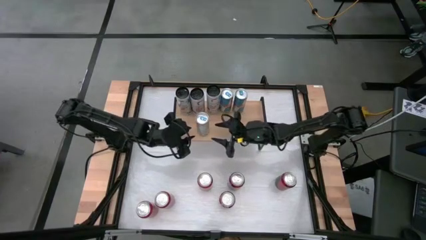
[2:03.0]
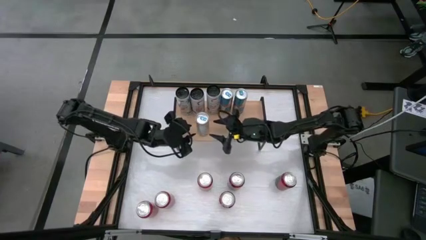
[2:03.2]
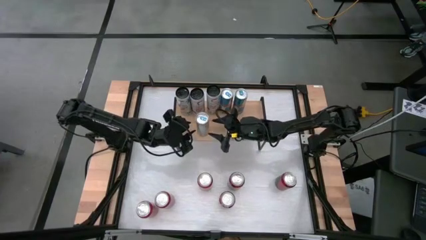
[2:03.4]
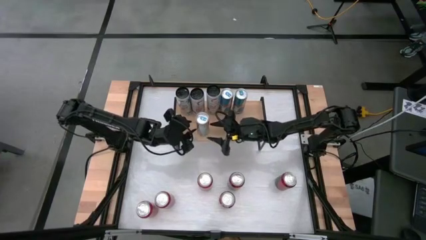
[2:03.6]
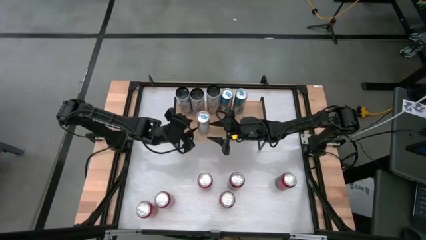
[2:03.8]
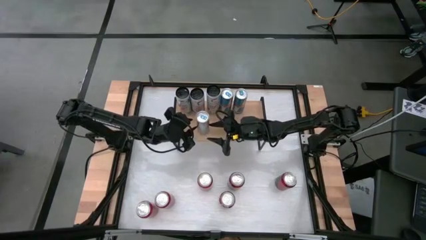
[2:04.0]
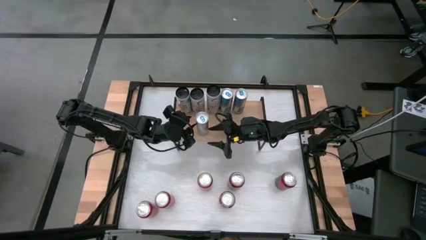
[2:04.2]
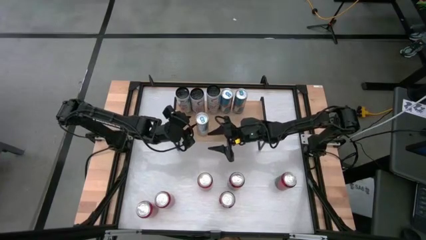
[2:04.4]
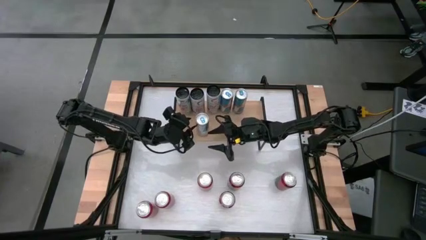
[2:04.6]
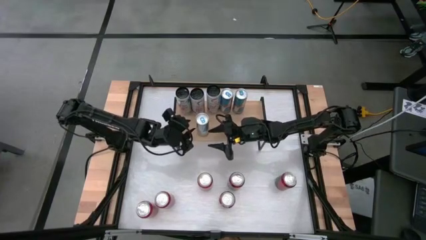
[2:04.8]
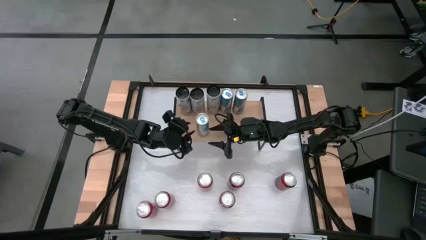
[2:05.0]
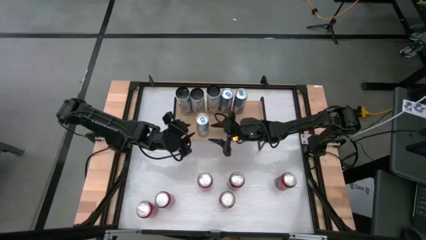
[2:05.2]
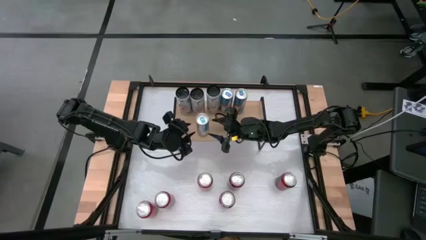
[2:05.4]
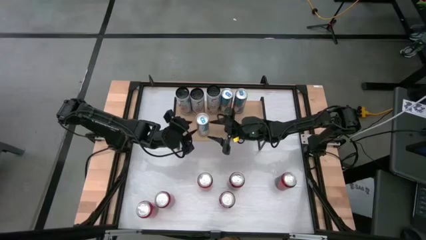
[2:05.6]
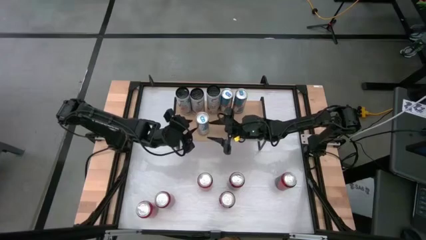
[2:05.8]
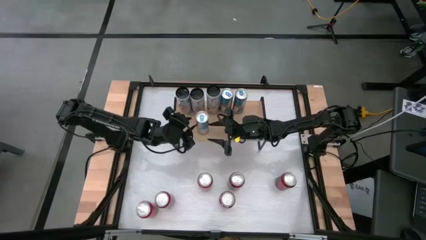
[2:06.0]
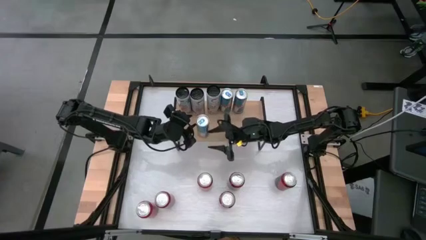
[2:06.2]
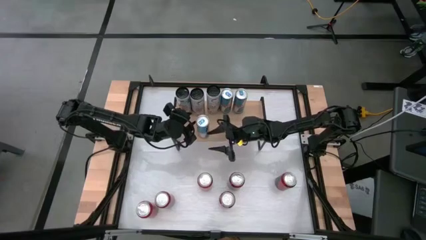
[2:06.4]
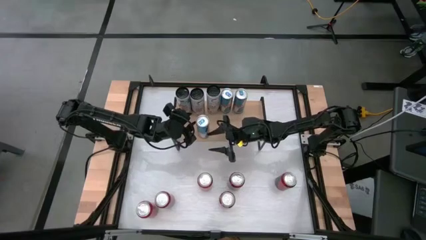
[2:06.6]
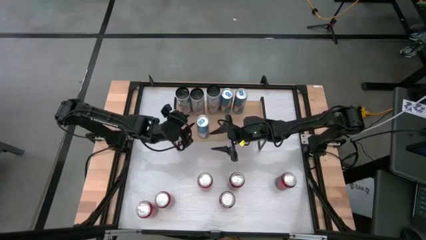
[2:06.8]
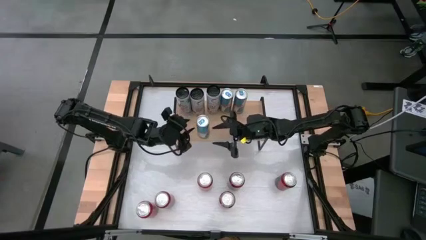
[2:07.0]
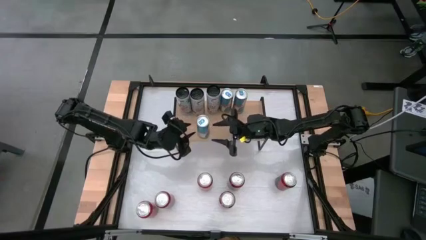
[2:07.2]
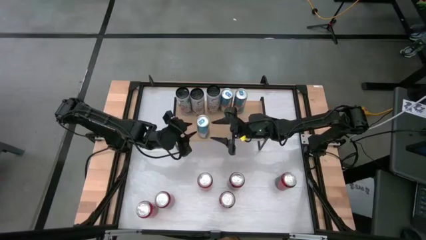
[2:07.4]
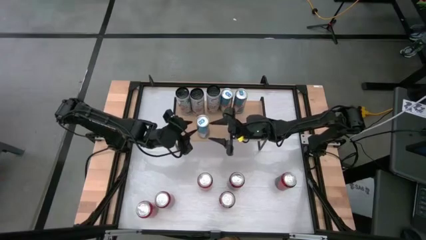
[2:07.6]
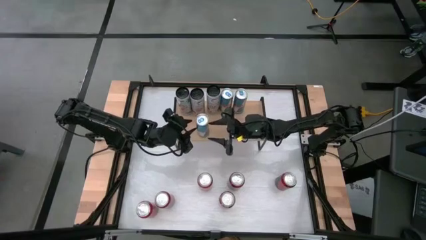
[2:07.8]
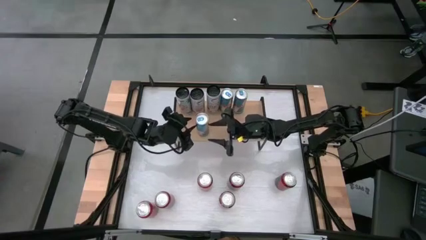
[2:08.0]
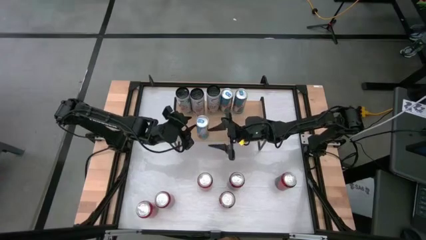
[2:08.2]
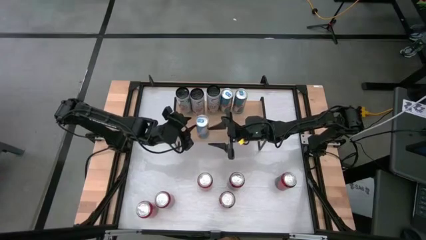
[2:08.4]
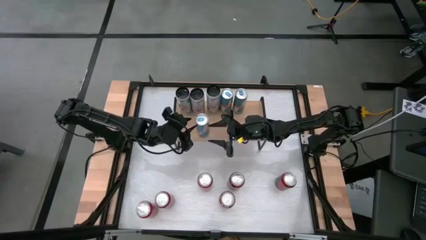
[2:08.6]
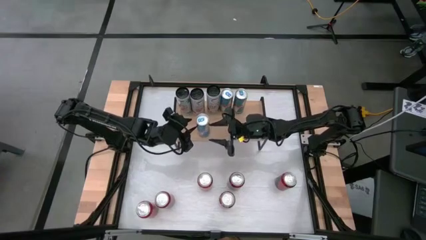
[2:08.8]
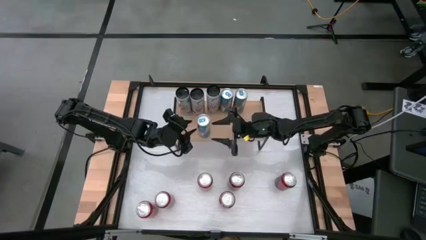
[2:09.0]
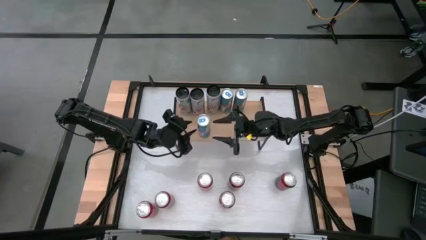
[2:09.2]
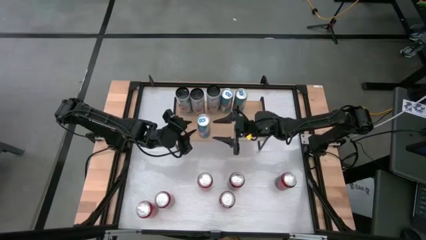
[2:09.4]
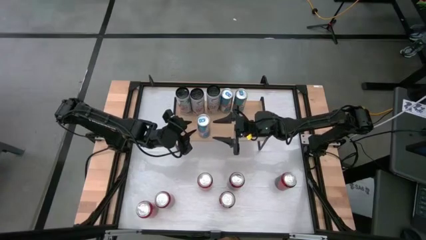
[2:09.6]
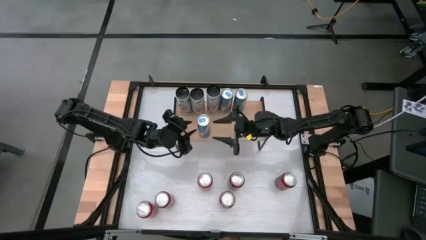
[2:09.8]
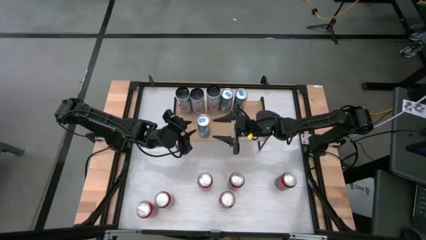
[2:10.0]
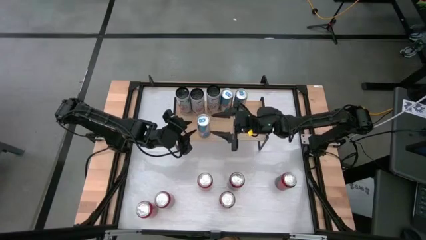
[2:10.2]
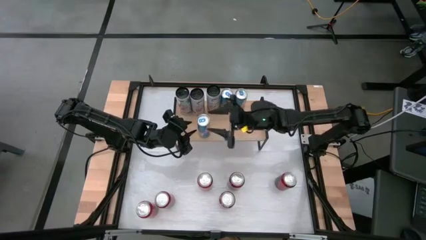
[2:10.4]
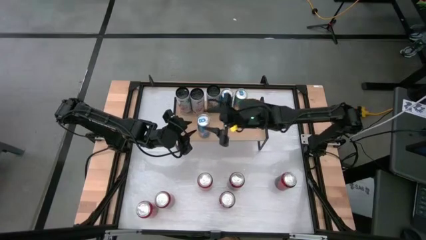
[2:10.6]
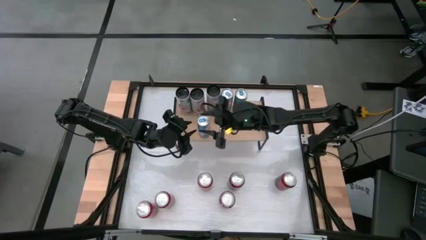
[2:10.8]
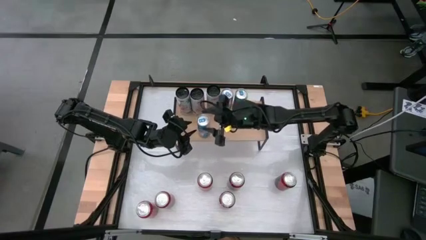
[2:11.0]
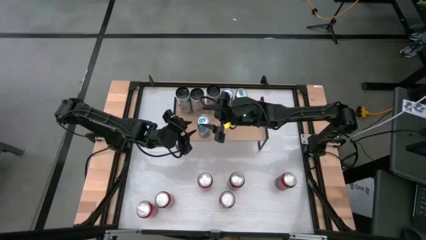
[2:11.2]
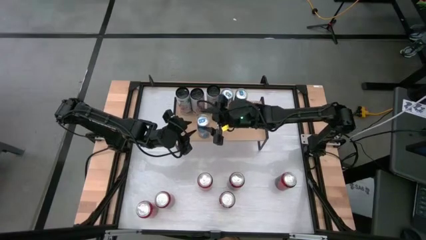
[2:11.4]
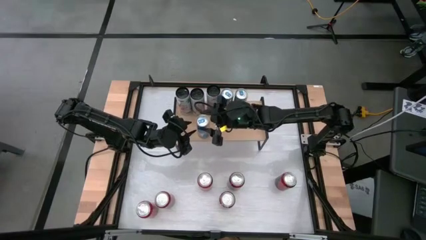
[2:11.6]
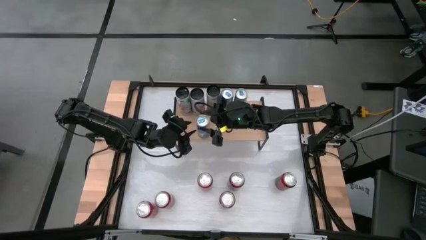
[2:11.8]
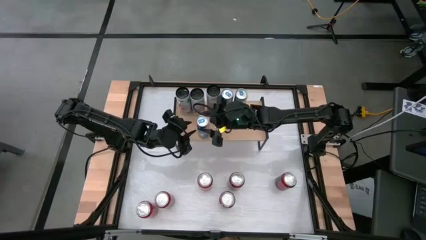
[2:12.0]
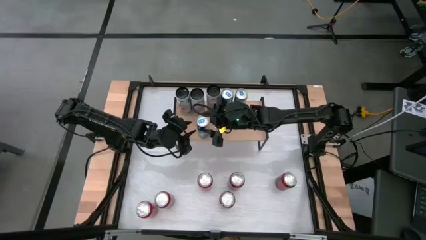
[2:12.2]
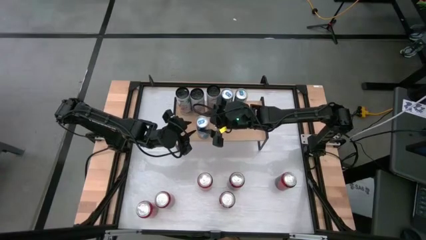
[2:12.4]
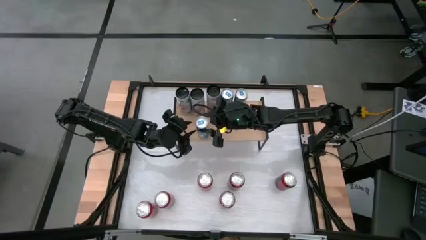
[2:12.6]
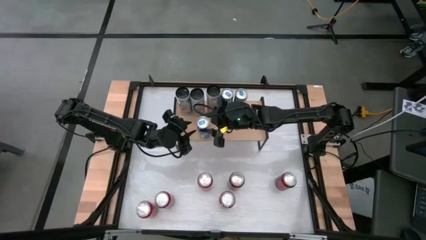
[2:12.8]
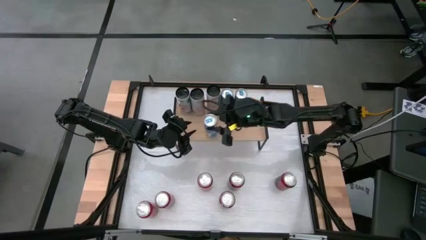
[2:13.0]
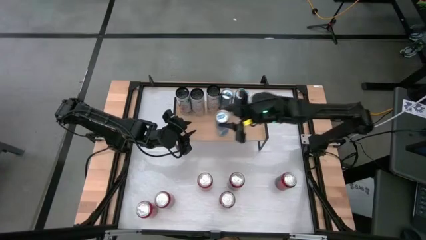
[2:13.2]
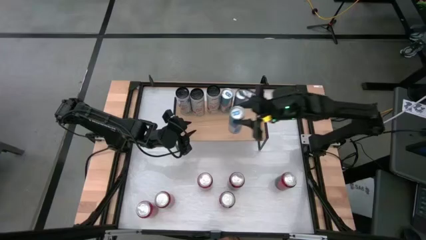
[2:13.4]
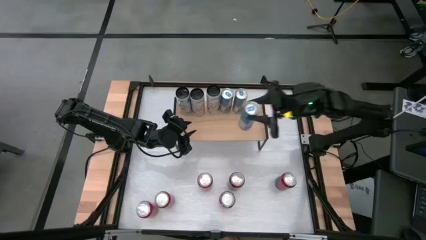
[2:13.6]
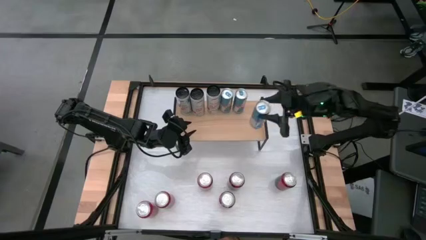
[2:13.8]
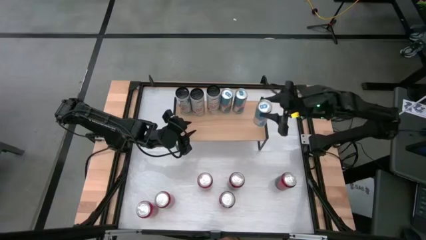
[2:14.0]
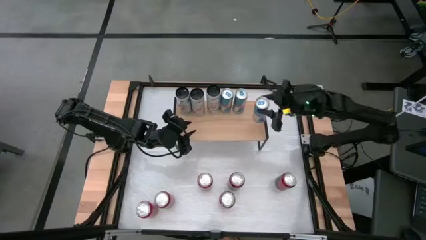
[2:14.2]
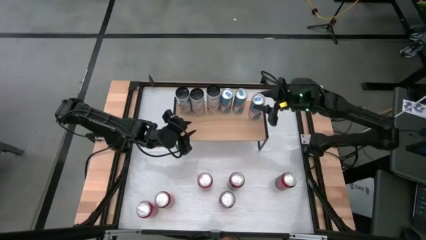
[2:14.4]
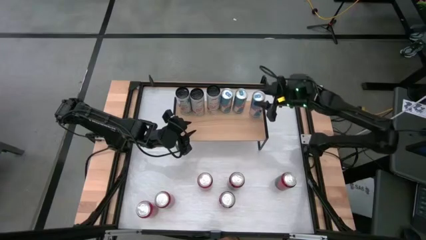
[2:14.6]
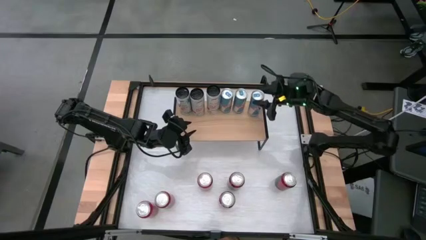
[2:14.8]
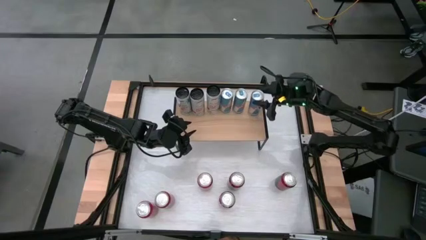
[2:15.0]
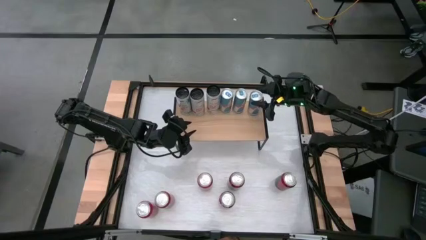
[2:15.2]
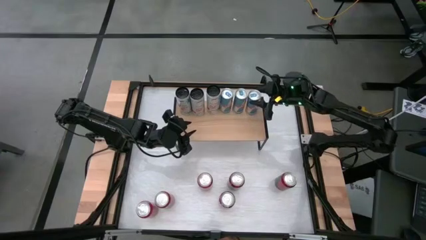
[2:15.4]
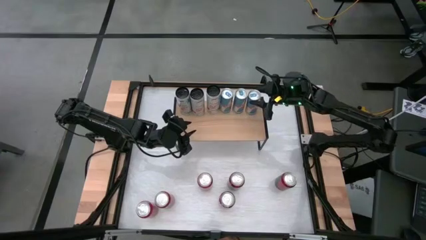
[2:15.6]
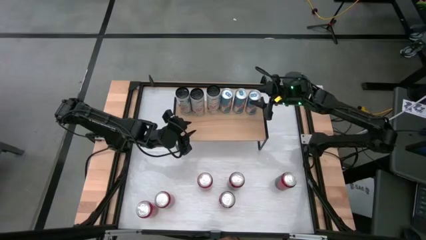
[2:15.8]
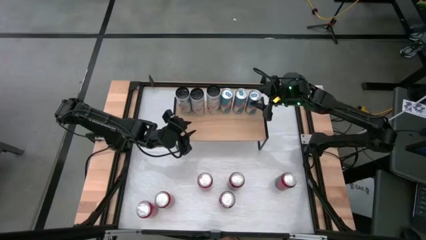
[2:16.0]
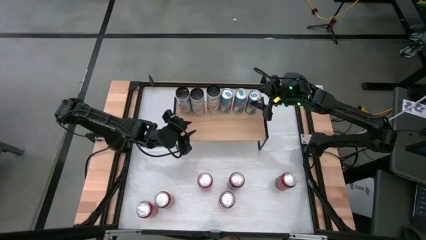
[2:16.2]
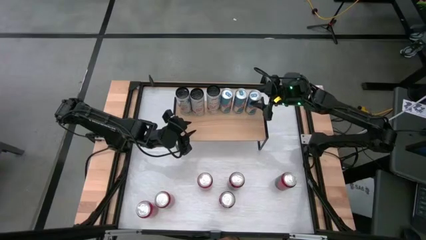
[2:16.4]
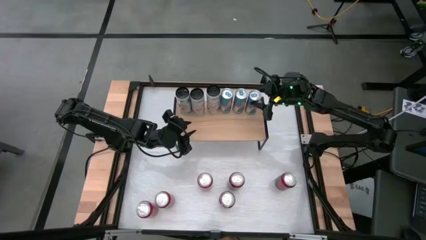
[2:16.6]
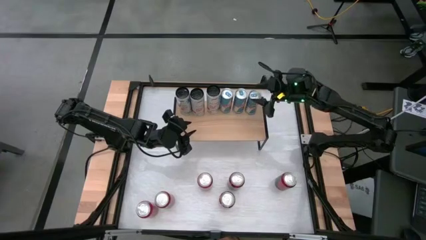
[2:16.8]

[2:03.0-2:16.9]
Task: Place canned beverage on shelf
Put the blue soda can on the shelf

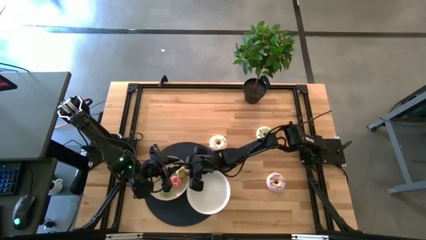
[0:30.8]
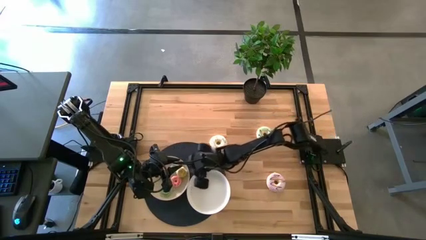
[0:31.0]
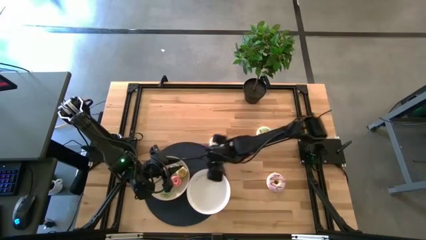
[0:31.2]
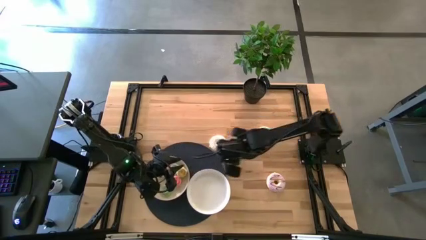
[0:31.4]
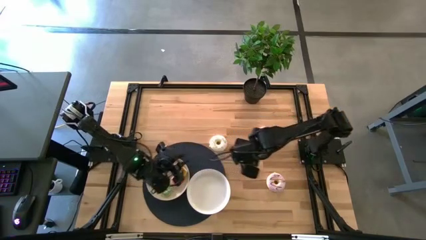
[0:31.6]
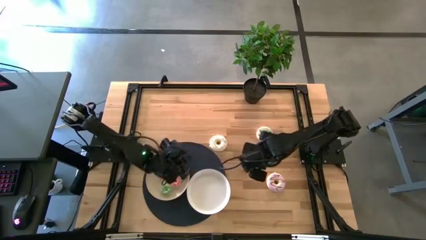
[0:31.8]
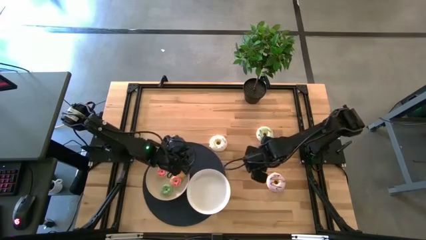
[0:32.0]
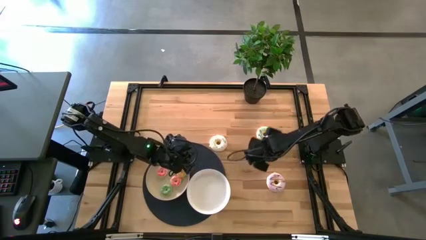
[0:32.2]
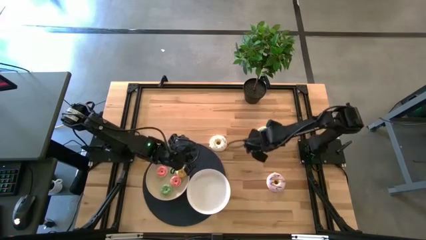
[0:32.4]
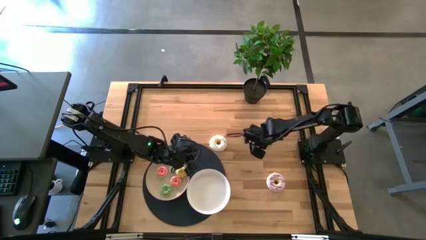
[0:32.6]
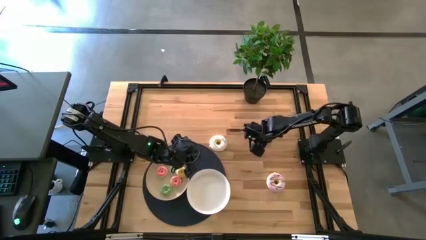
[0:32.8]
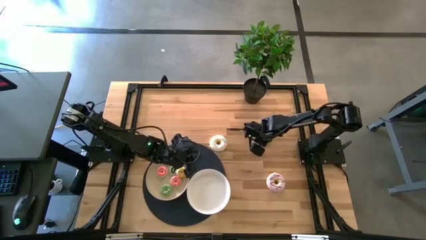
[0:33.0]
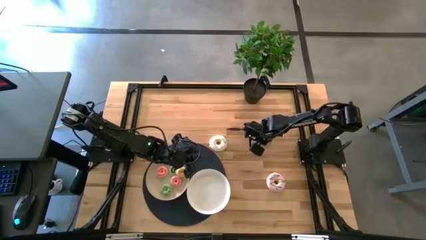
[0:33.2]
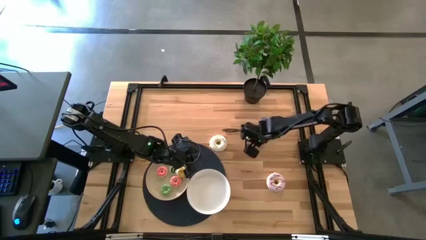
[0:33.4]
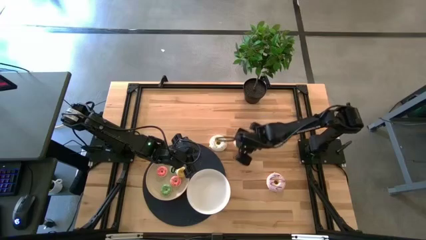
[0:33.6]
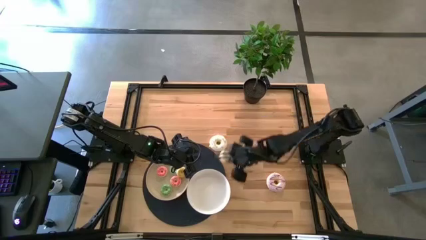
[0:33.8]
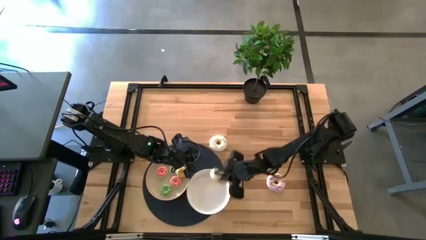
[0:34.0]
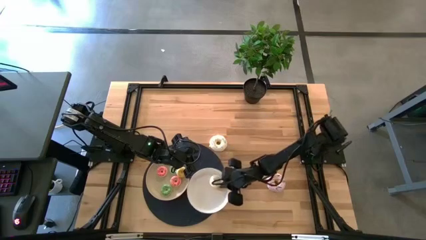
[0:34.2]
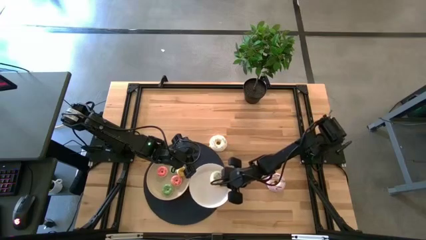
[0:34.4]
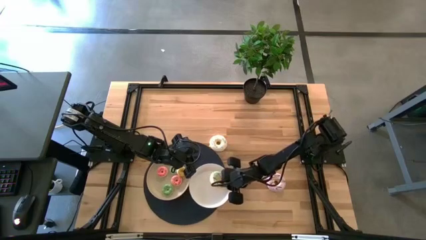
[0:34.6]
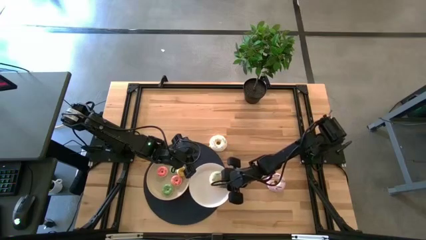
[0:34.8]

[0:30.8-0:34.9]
Task: Pick & Place donuts
Put the big light green donut on the right white plate
